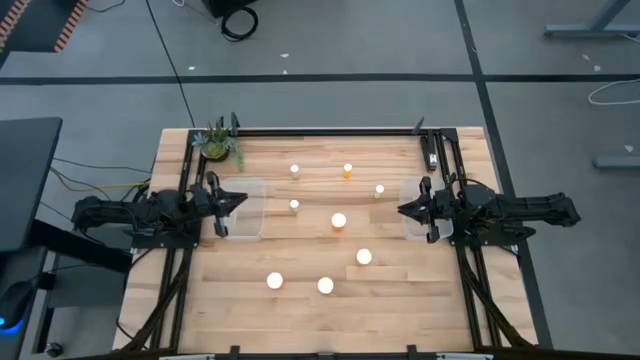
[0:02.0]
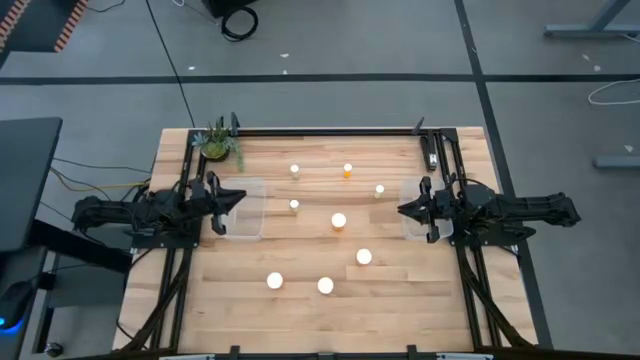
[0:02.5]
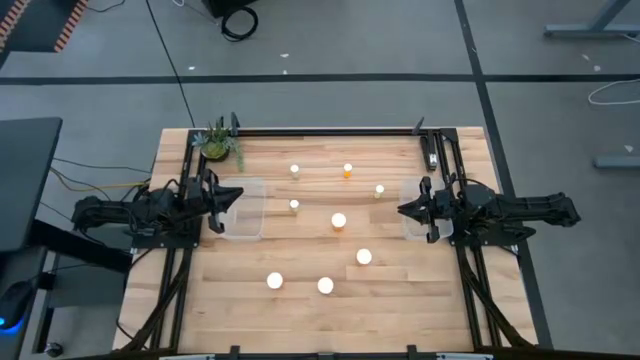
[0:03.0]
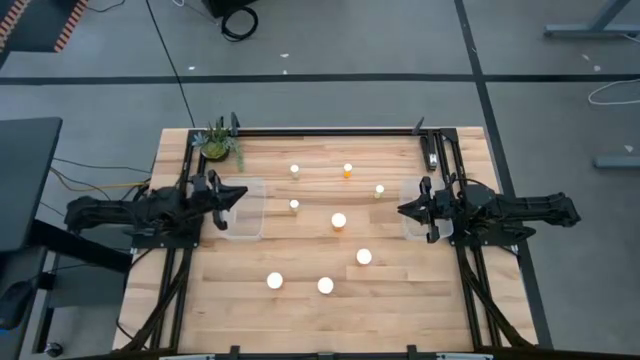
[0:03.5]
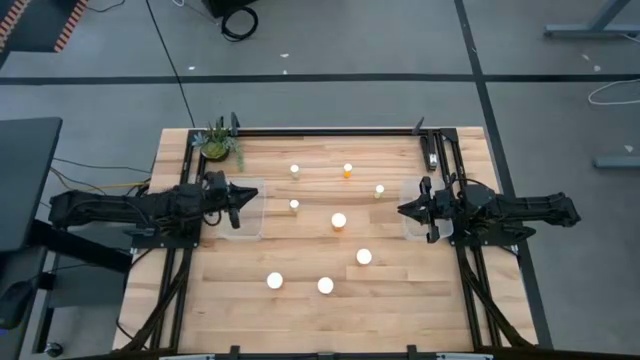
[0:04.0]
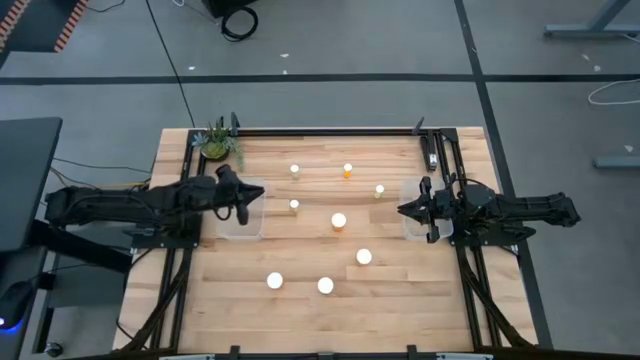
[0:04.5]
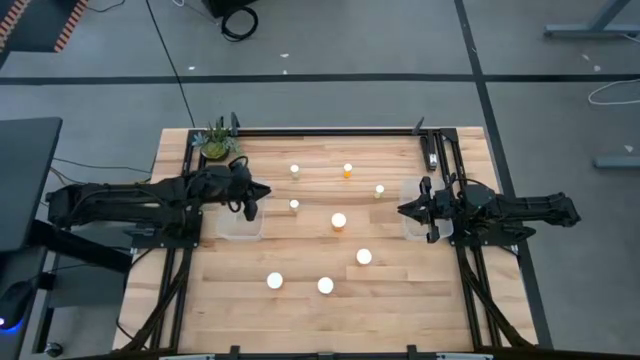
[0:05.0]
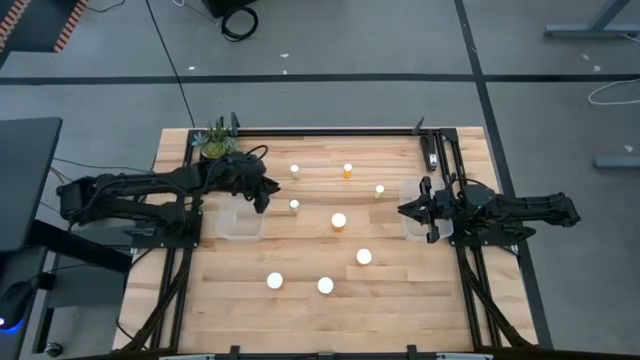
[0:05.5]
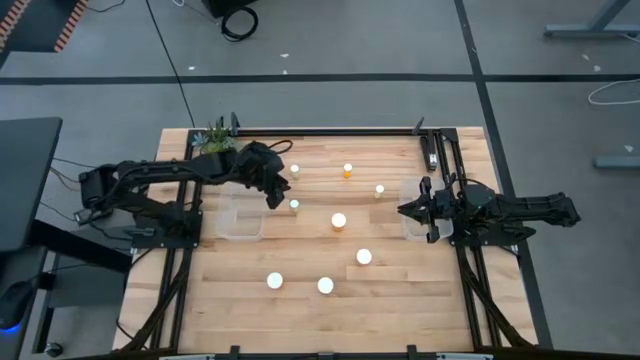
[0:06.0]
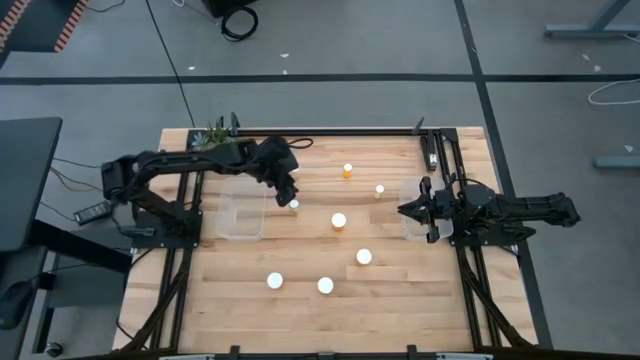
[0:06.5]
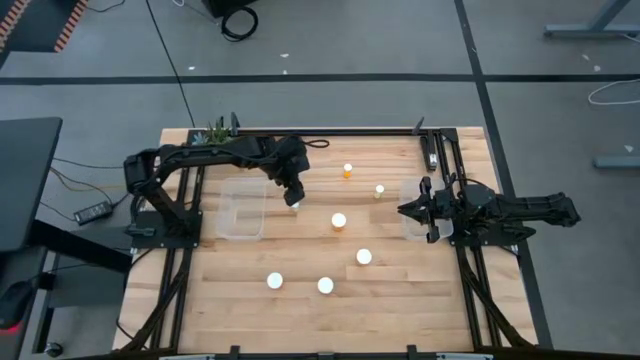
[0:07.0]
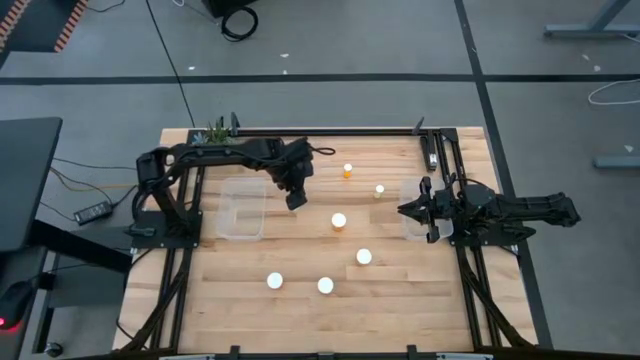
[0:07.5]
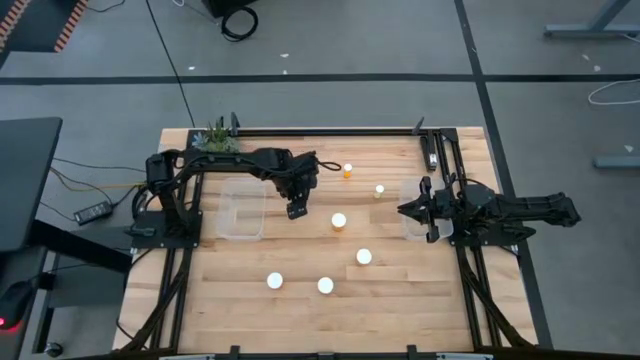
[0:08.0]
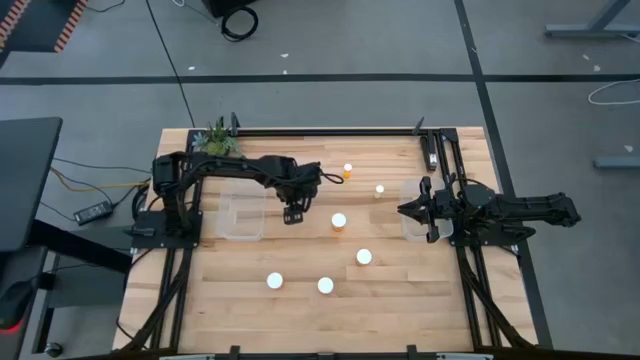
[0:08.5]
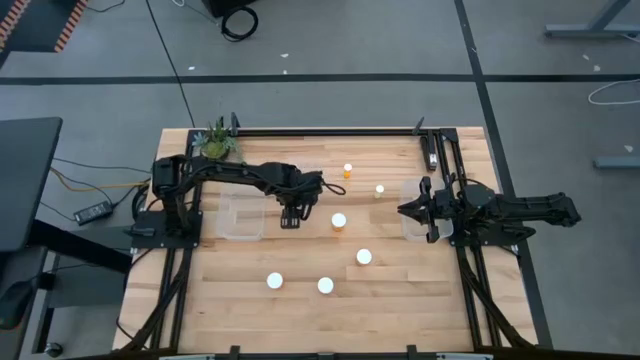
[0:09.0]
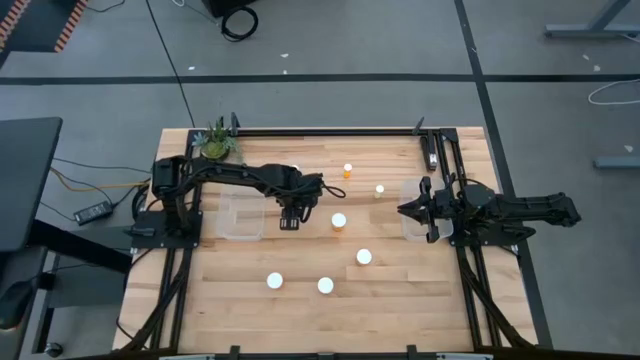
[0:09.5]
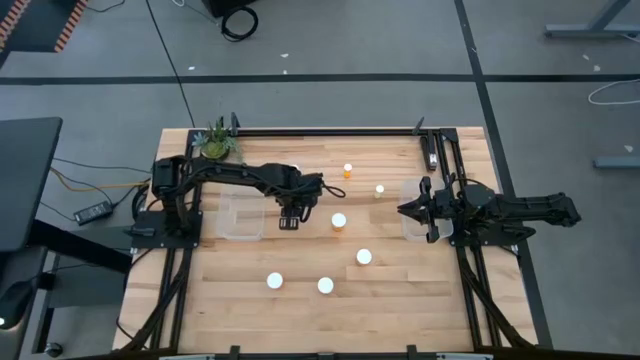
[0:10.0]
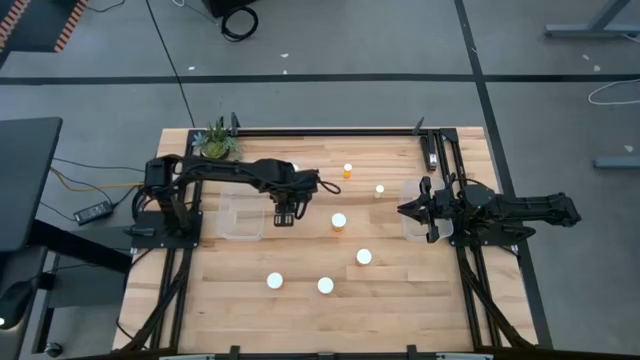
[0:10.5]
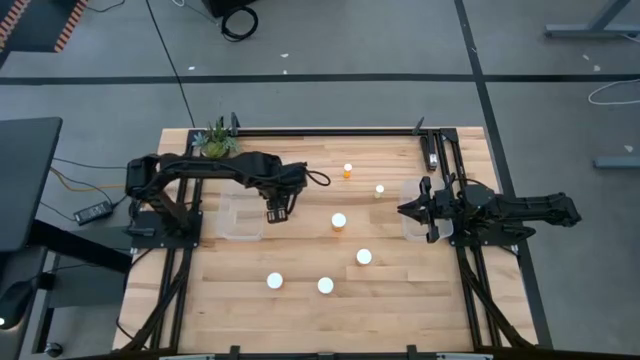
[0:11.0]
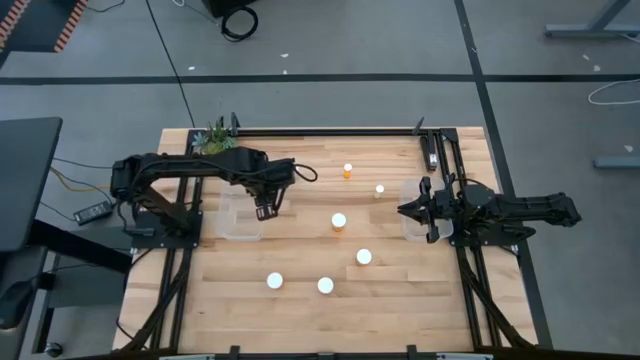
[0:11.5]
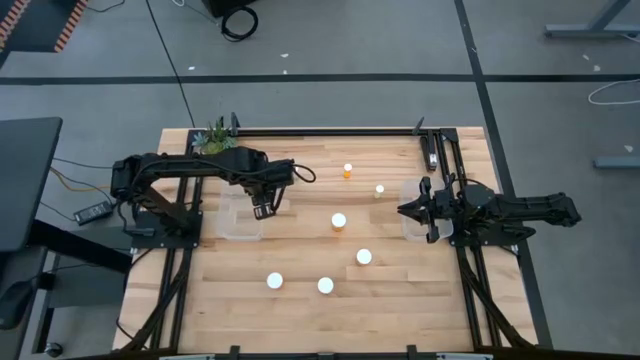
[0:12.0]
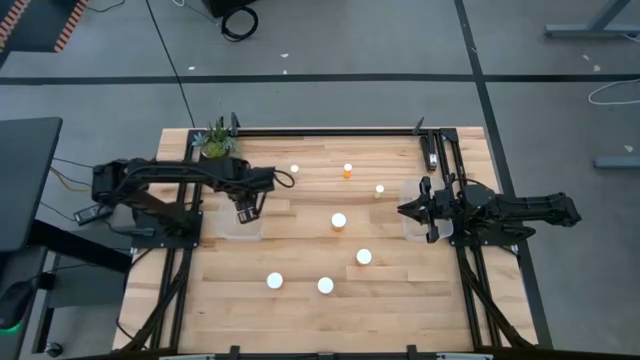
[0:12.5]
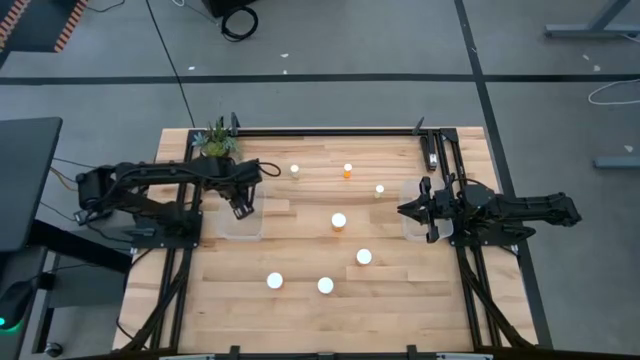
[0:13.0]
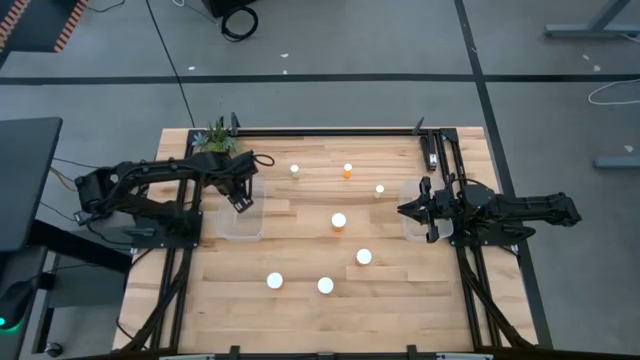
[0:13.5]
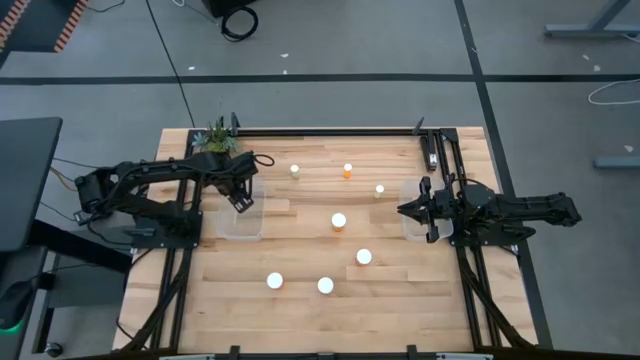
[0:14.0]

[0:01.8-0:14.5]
Task: Pick and place medicine bottles into bin by pill shape (circle, oval)
Put the small yellow pill bottle into the left transparent bin

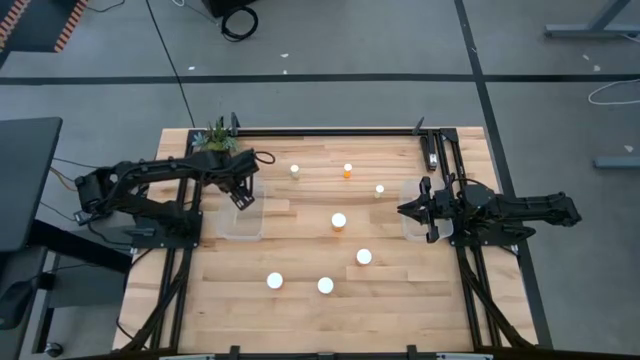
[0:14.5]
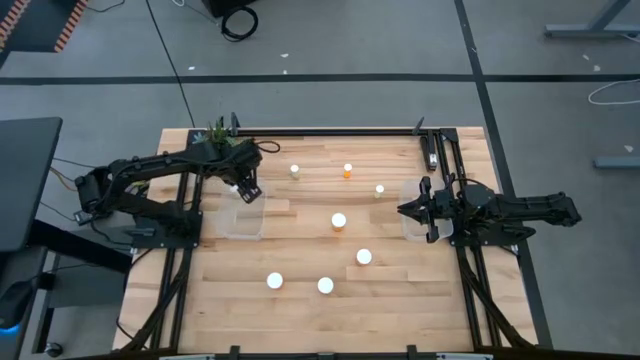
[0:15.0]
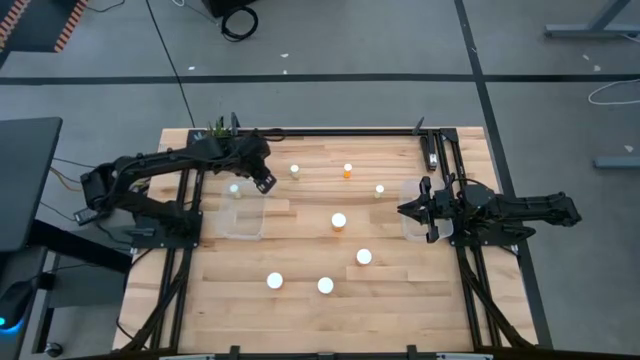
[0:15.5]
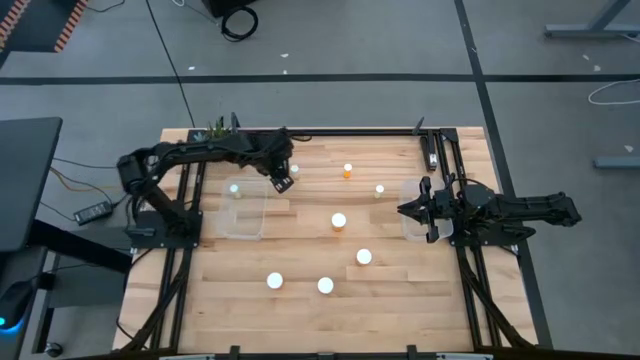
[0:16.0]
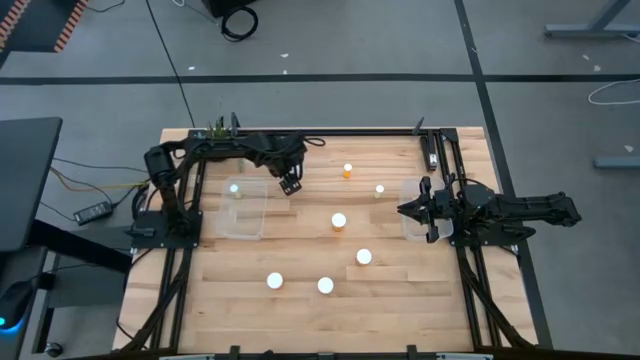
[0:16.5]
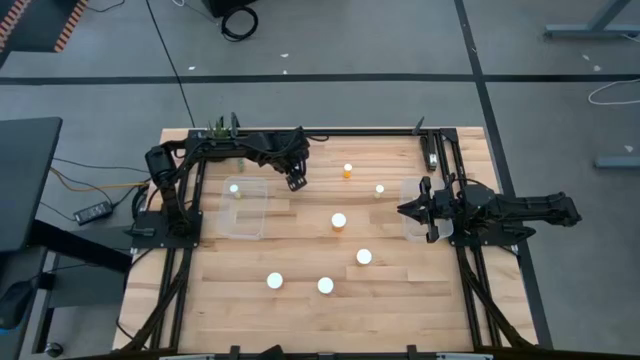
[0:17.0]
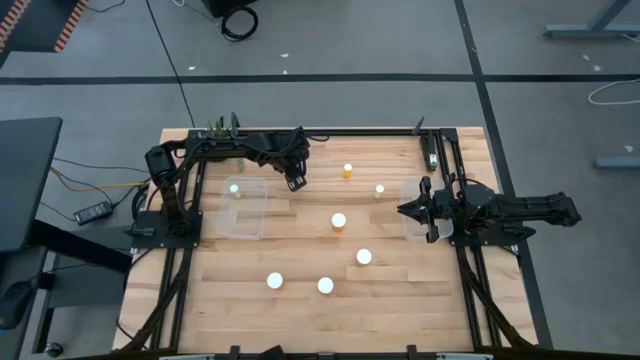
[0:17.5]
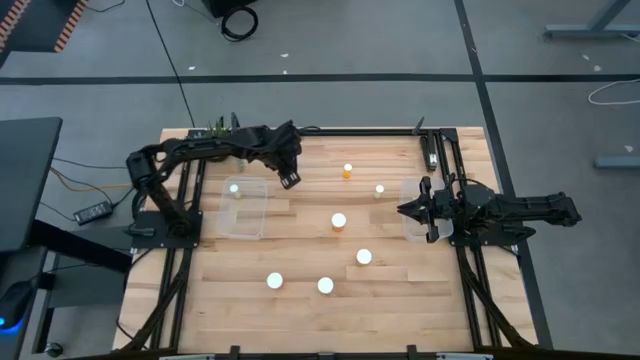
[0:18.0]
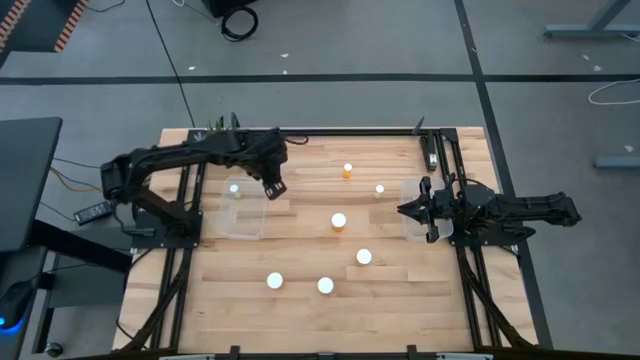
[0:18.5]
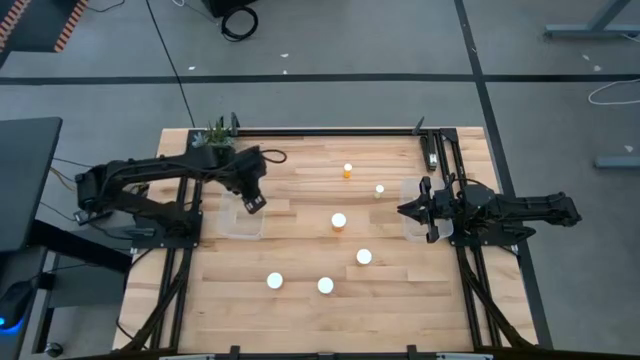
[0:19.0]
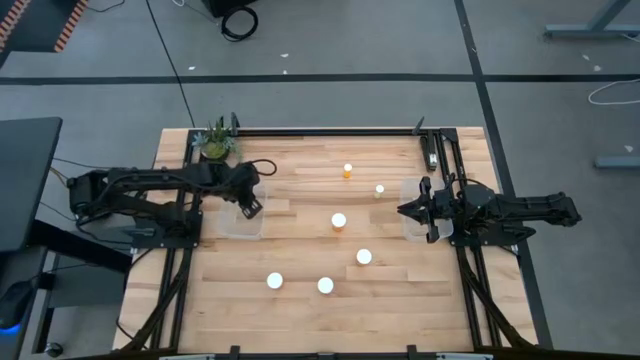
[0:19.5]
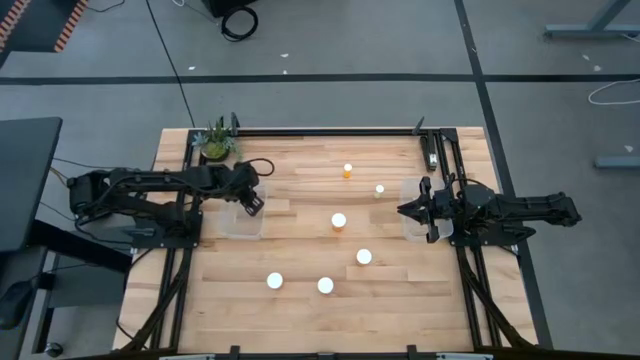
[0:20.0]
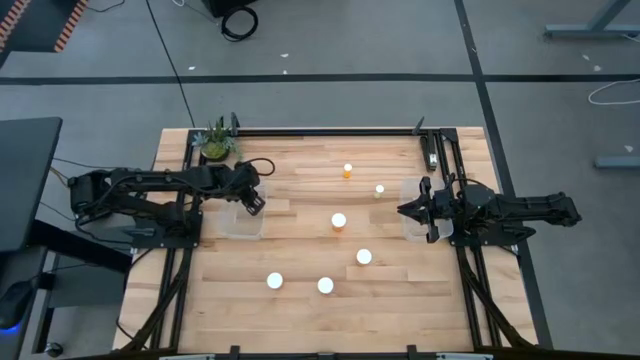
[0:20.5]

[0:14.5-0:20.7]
Put the small yellow pill bottle into the left transparent bin

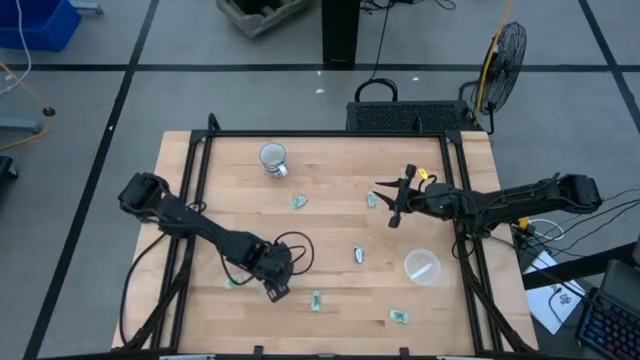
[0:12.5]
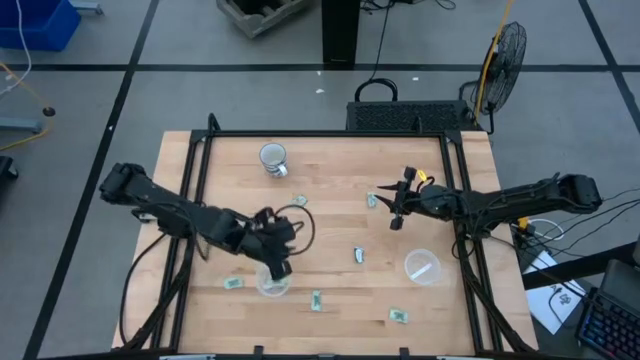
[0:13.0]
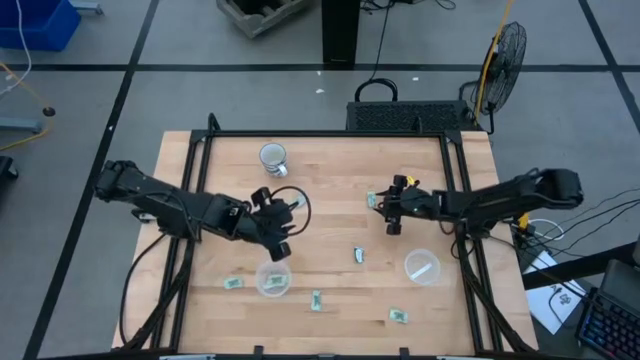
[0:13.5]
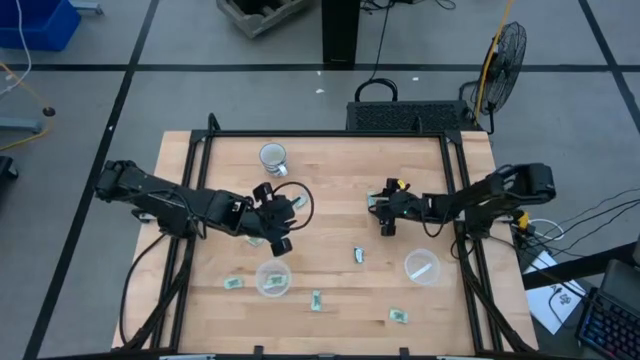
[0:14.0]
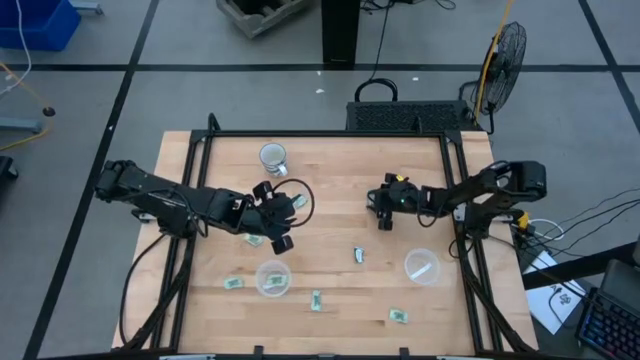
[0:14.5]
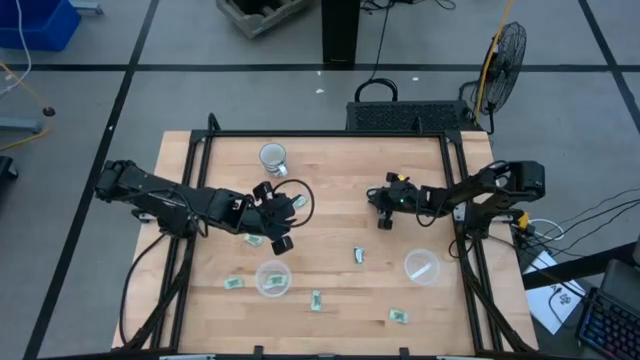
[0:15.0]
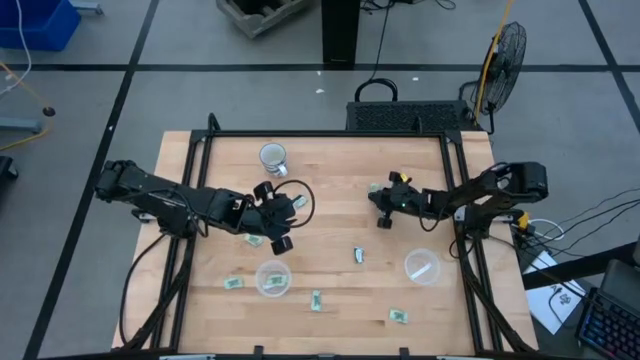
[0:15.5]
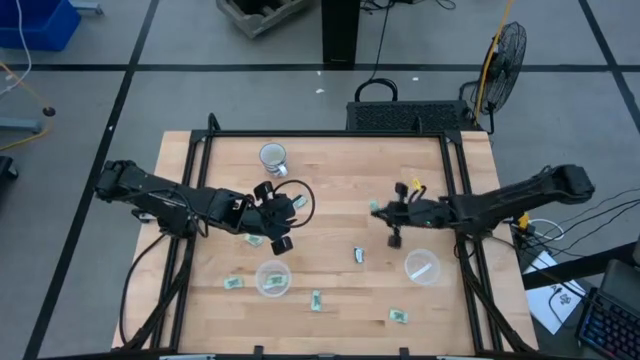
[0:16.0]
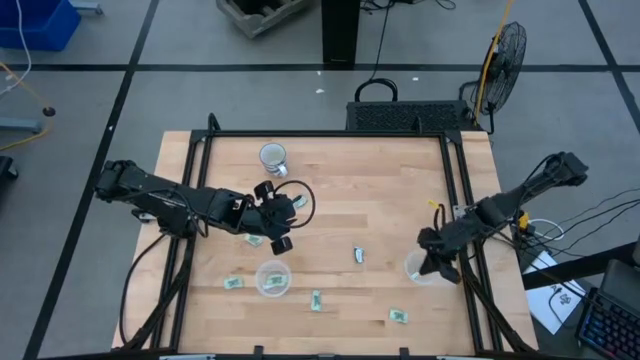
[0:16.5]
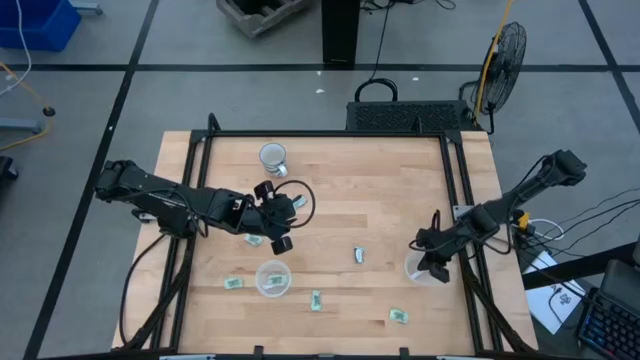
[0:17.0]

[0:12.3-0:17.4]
Task: Pick and place items into bin
Put the stevia packet into the right transparent bin
